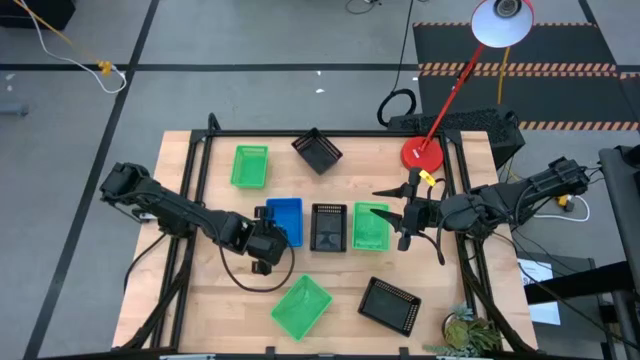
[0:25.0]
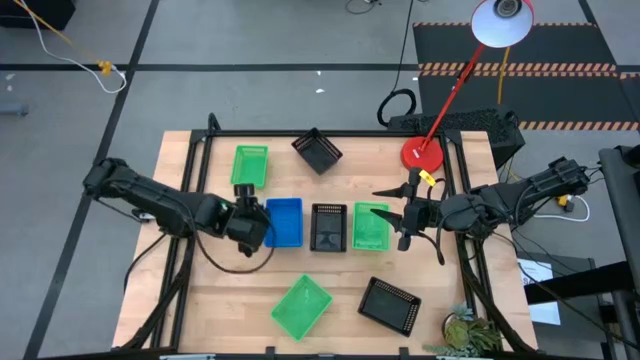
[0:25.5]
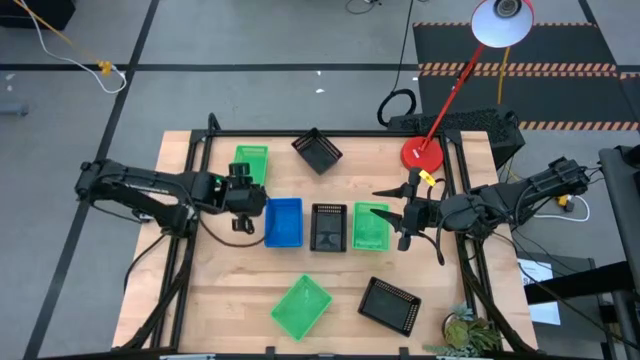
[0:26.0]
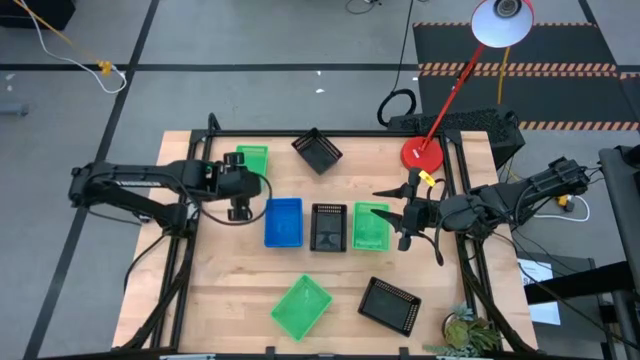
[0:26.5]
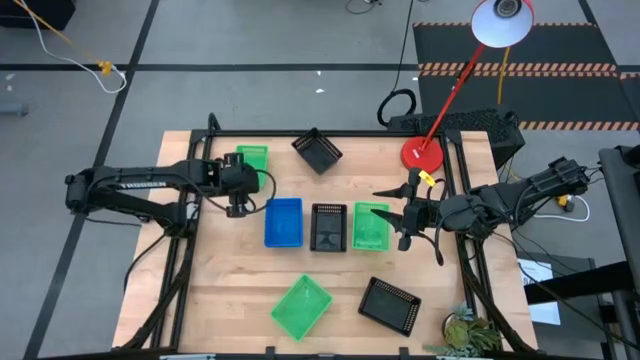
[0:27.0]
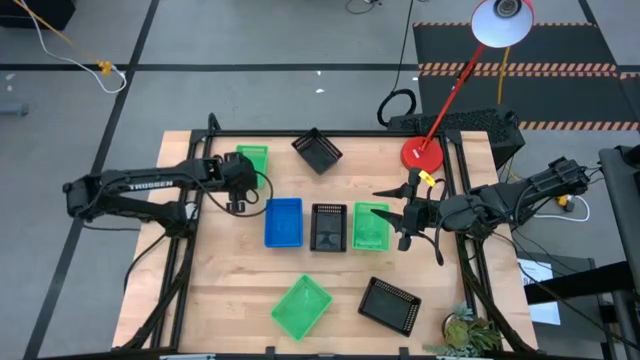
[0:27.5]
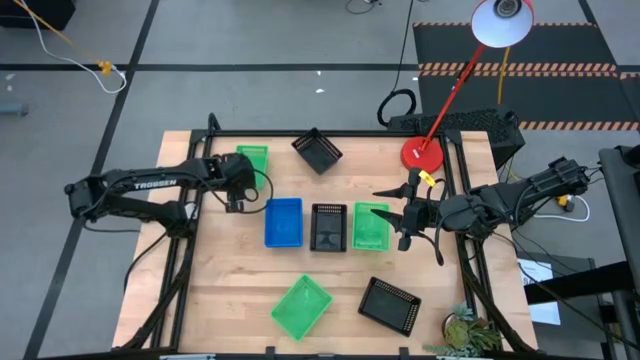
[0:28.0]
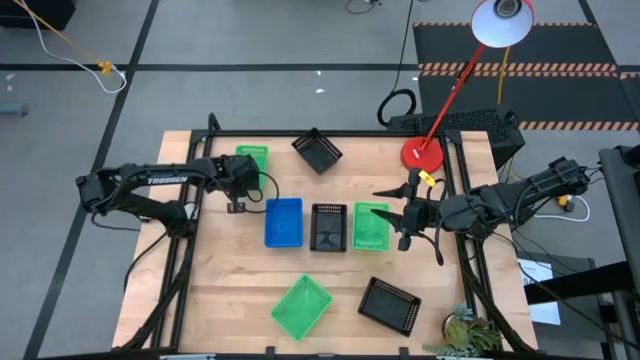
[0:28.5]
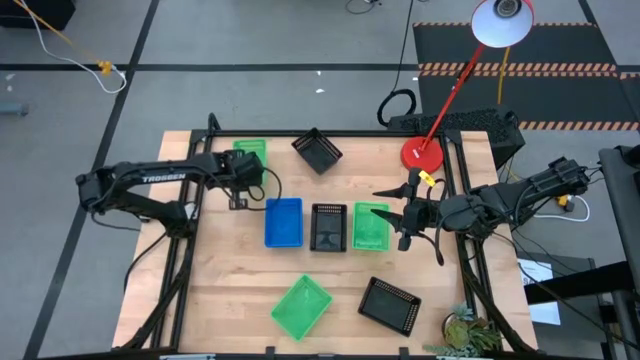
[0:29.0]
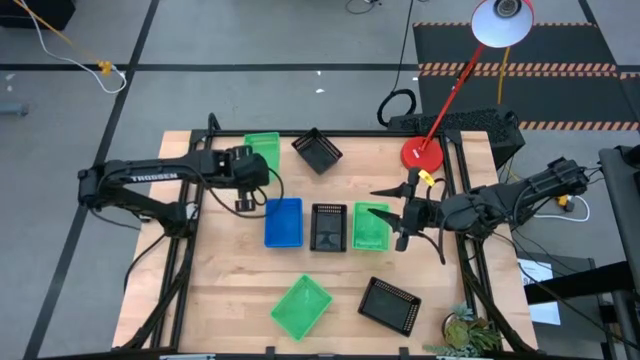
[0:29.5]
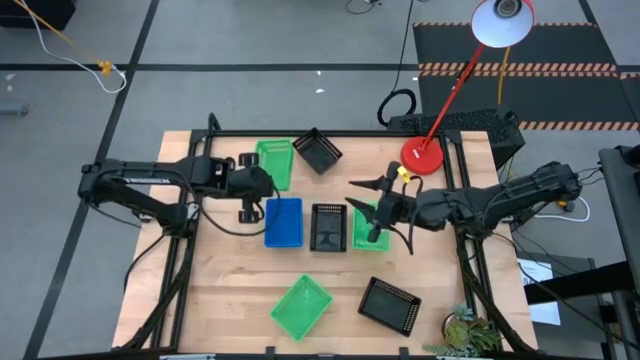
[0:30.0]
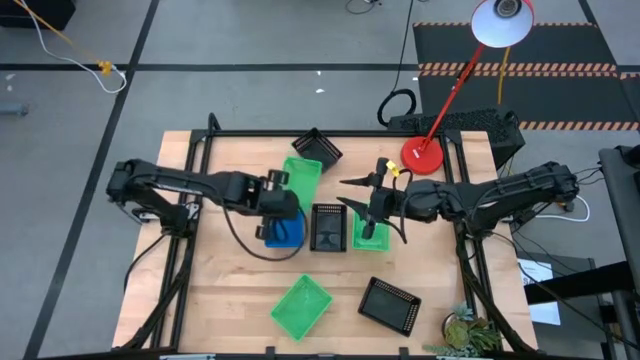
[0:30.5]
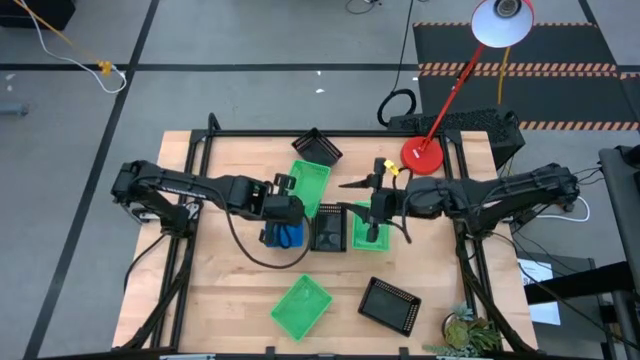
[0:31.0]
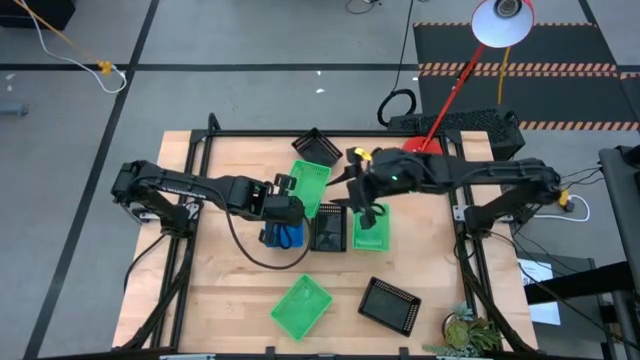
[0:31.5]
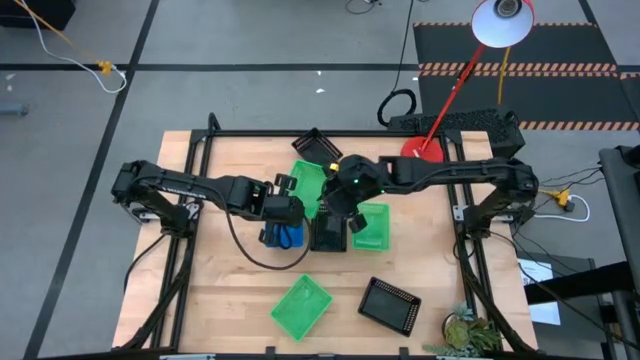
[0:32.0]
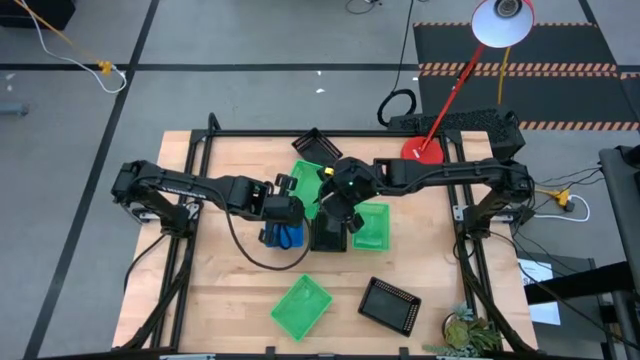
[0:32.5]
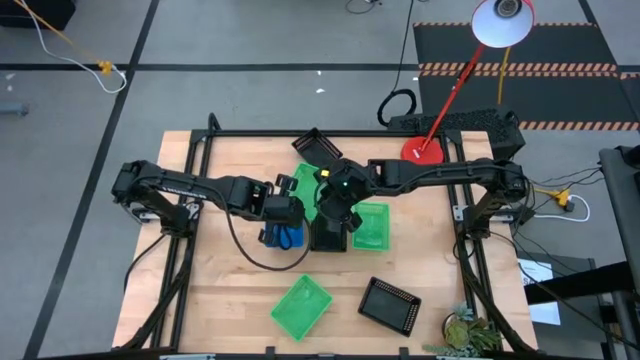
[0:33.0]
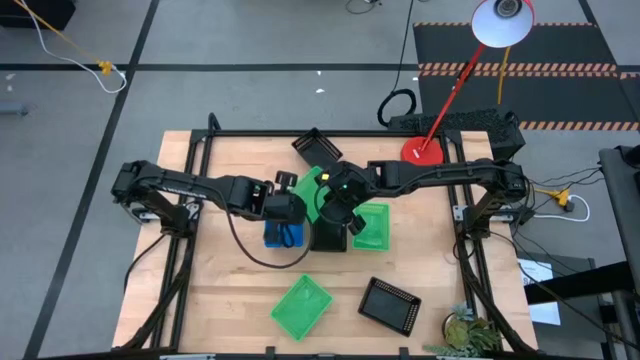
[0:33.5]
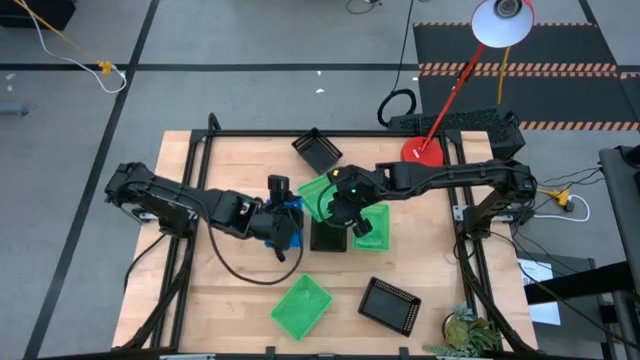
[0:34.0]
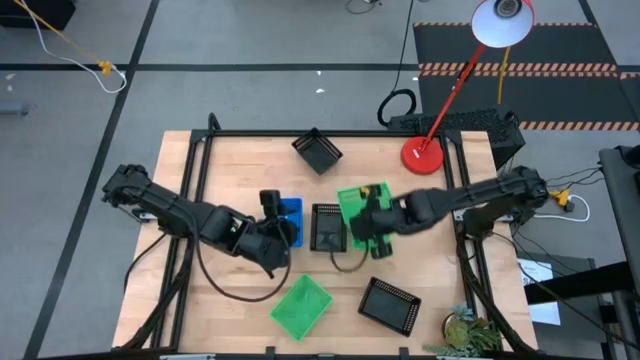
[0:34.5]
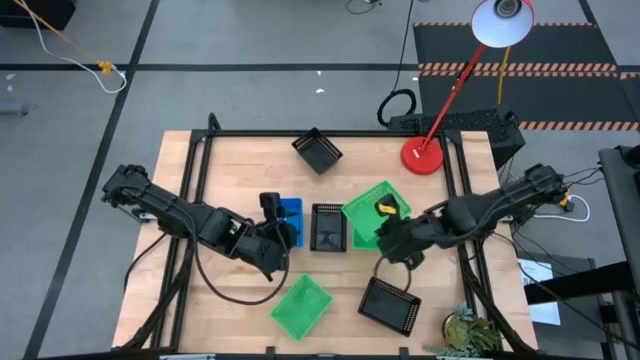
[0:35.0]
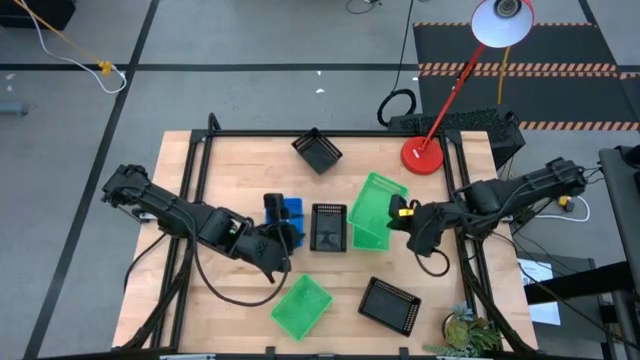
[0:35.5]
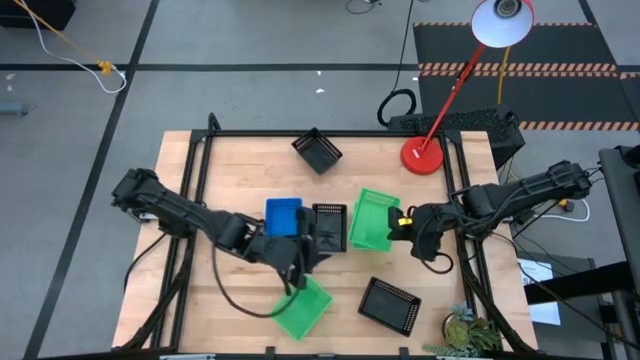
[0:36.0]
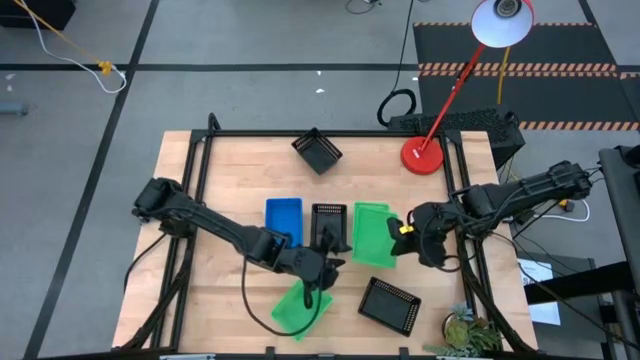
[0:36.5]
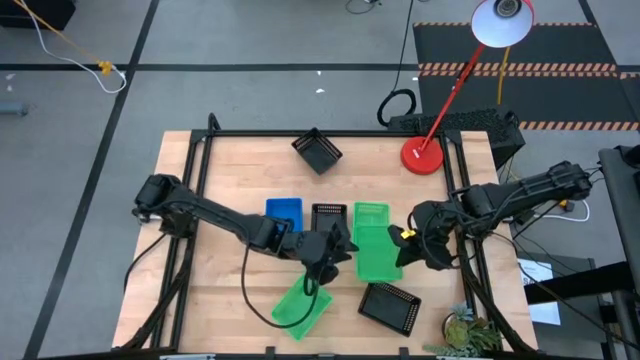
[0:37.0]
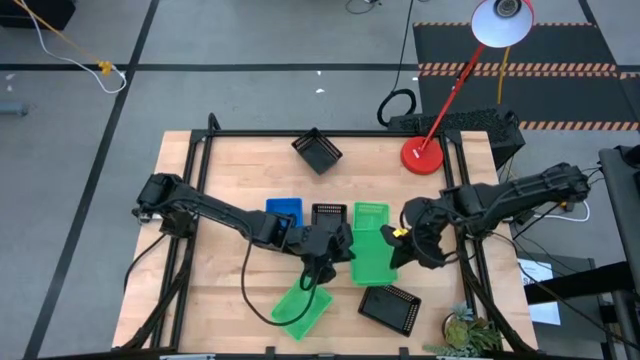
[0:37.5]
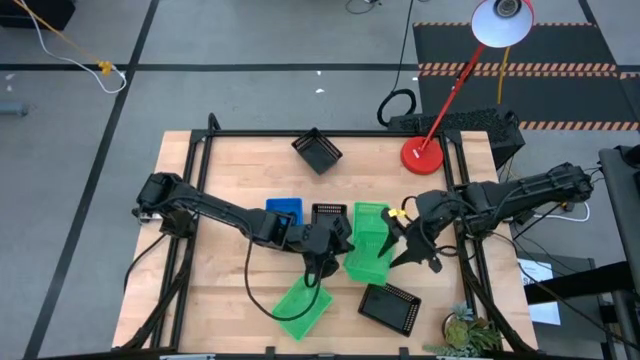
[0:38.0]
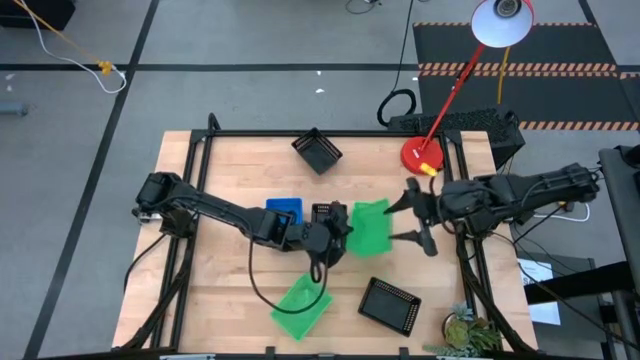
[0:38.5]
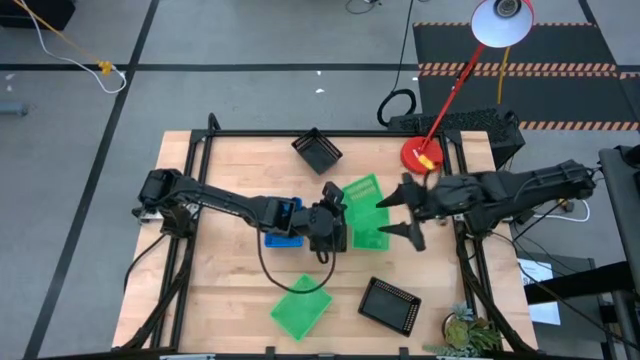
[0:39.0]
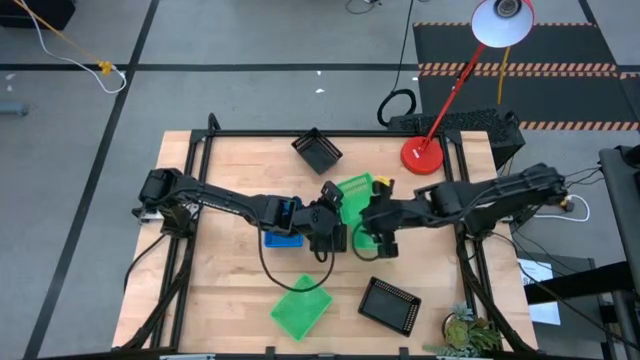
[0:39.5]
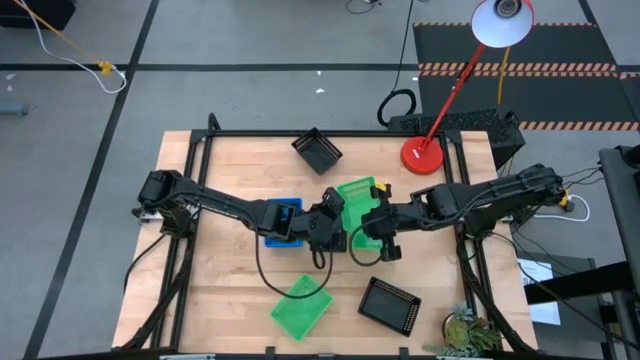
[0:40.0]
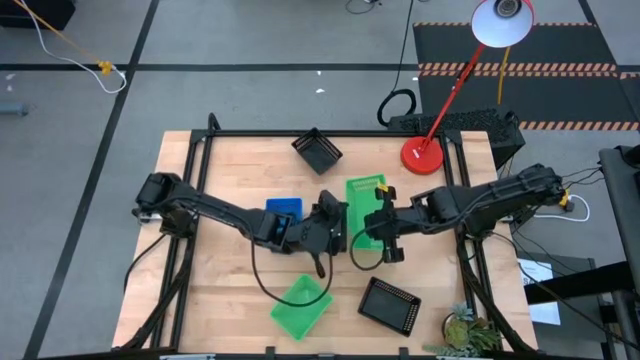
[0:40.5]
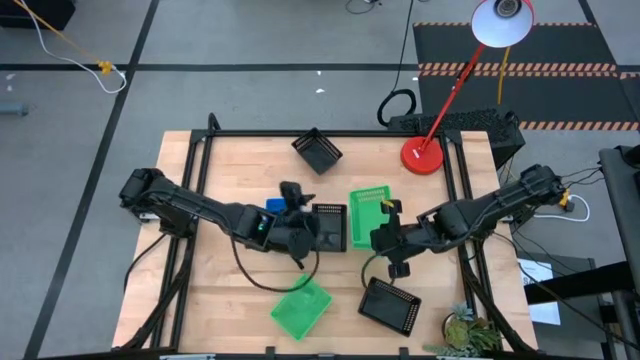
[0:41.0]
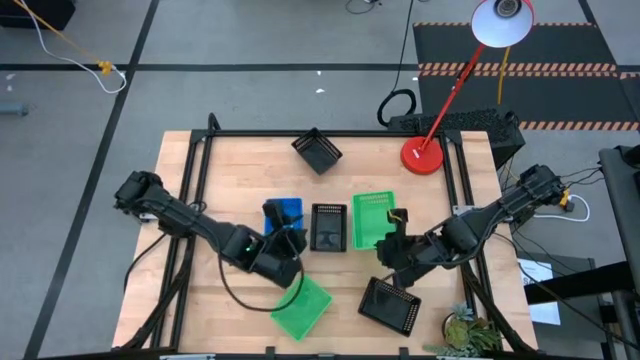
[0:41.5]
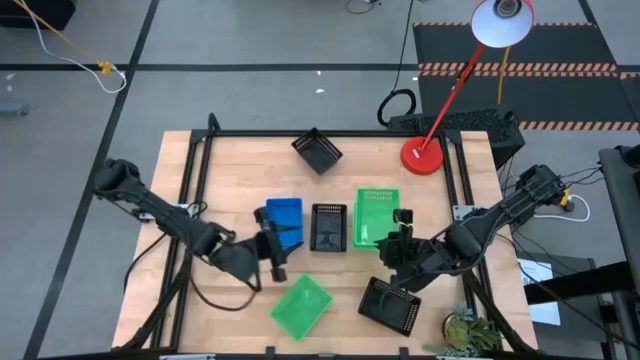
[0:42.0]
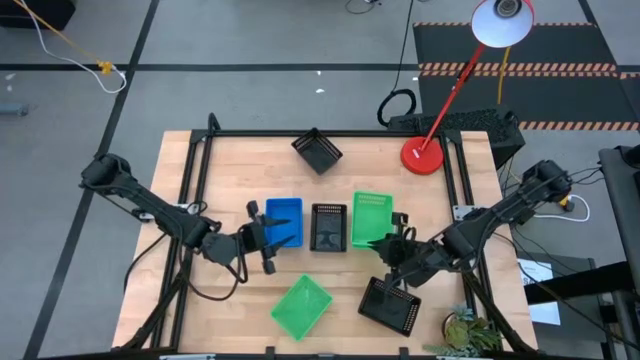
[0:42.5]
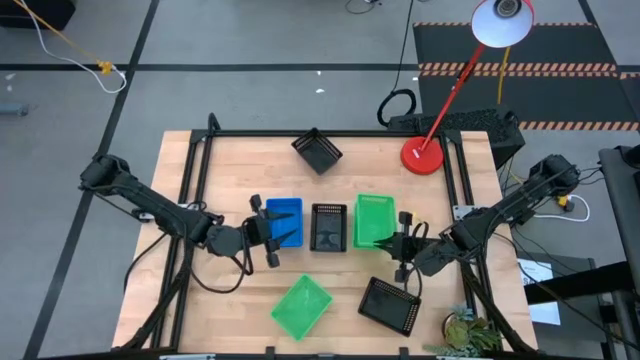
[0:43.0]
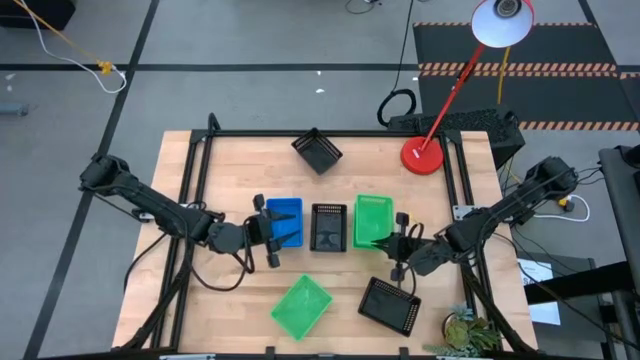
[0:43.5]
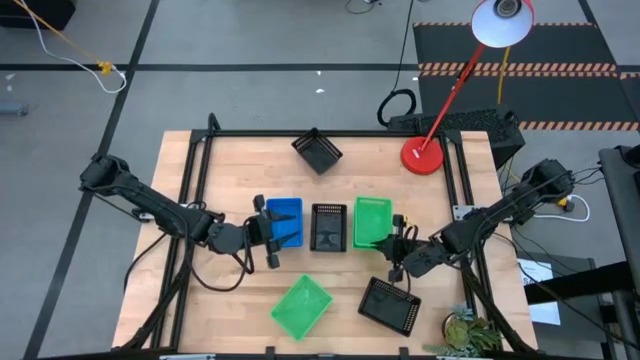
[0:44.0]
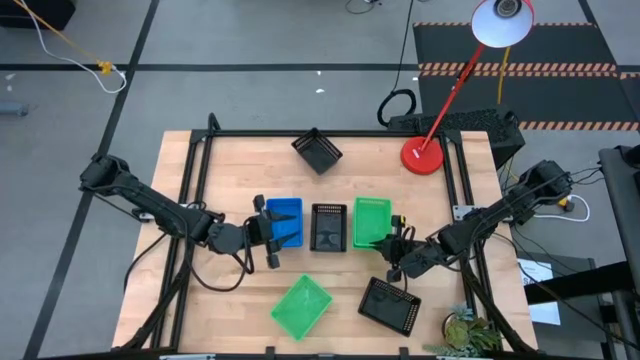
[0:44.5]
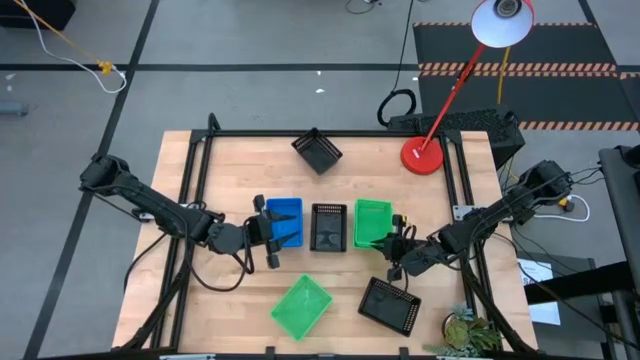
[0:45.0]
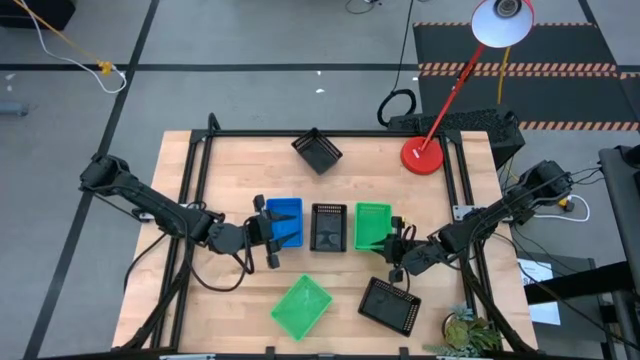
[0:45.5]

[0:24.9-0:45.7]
Stack the bottom green bin on top of stacked green bins
